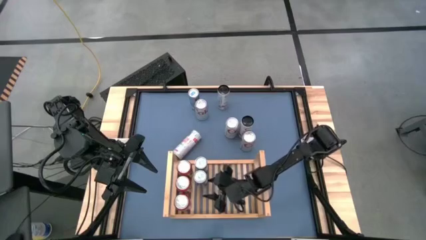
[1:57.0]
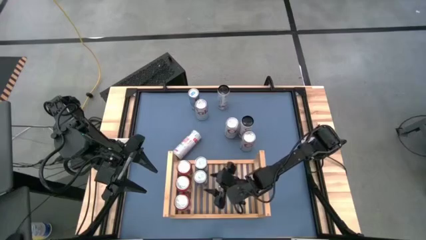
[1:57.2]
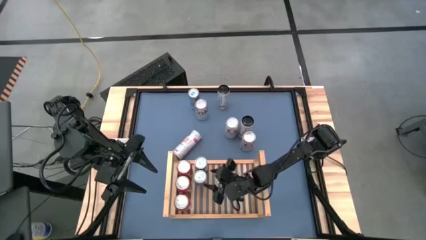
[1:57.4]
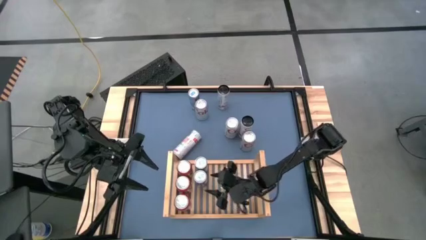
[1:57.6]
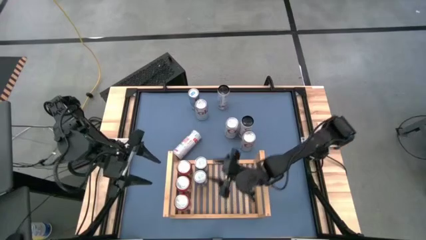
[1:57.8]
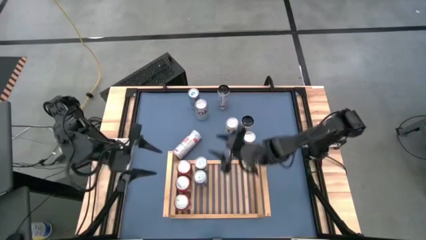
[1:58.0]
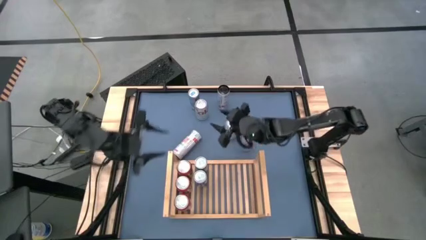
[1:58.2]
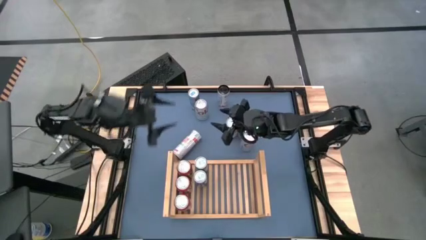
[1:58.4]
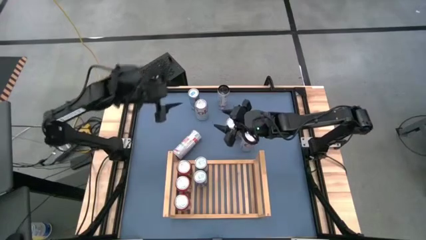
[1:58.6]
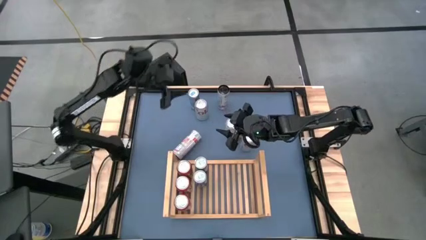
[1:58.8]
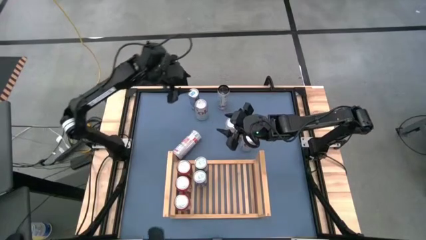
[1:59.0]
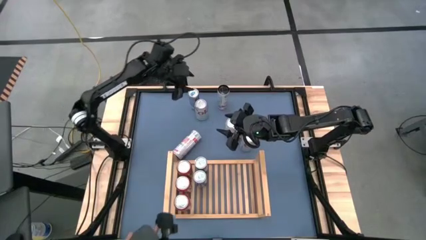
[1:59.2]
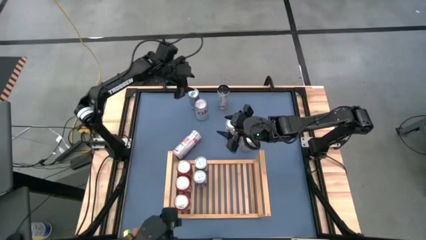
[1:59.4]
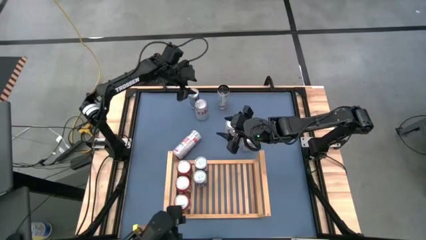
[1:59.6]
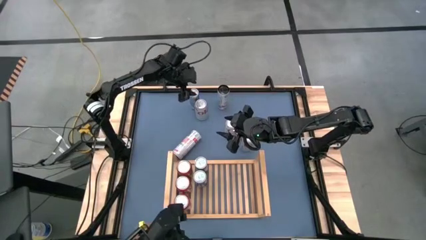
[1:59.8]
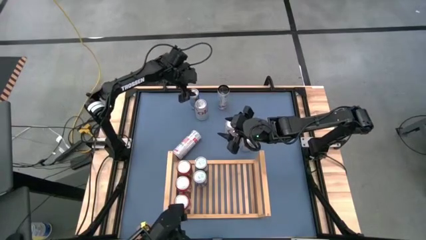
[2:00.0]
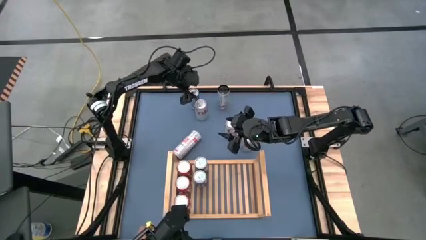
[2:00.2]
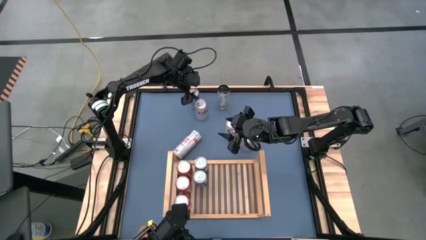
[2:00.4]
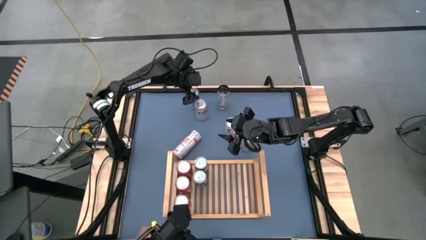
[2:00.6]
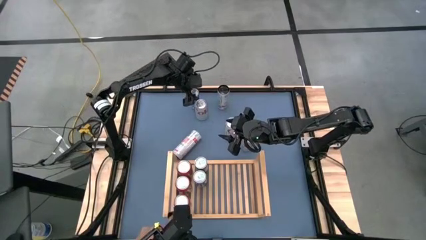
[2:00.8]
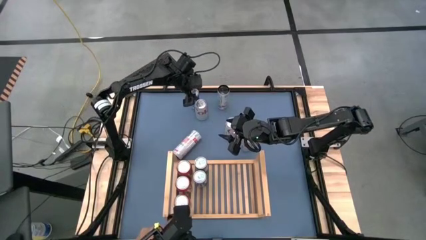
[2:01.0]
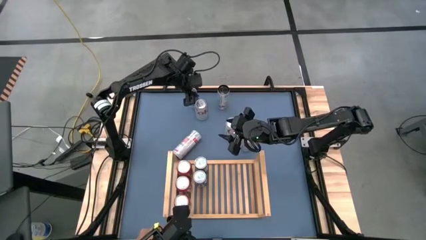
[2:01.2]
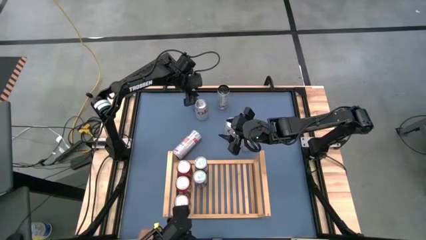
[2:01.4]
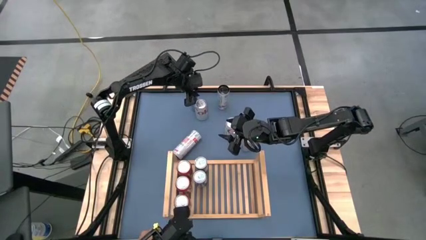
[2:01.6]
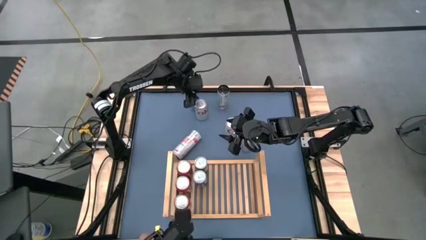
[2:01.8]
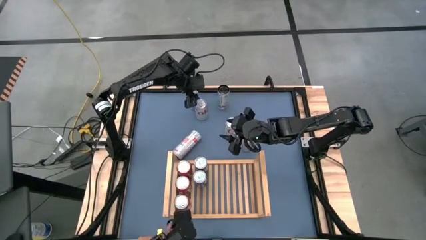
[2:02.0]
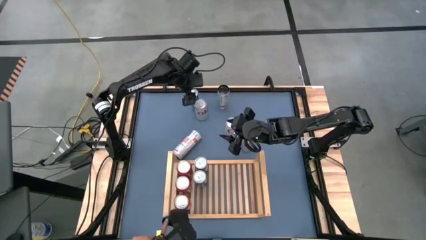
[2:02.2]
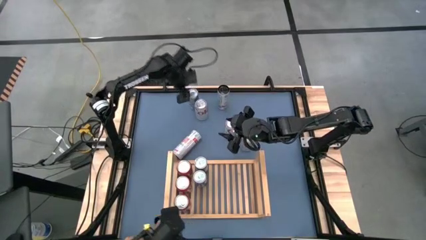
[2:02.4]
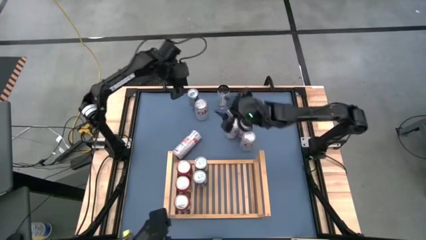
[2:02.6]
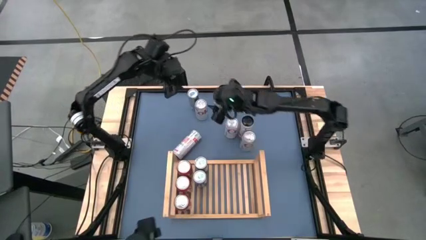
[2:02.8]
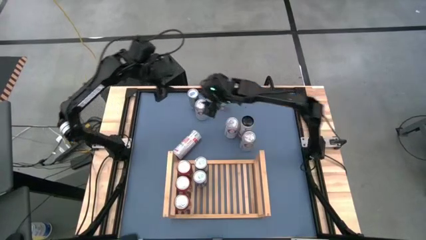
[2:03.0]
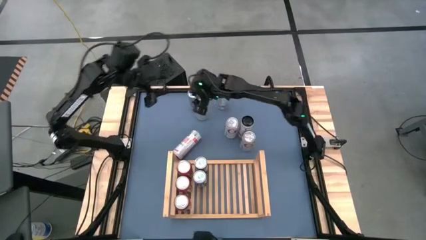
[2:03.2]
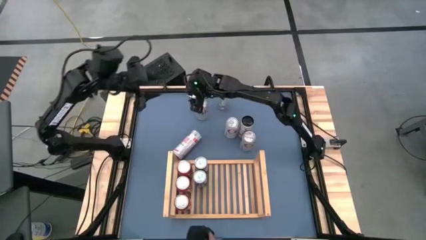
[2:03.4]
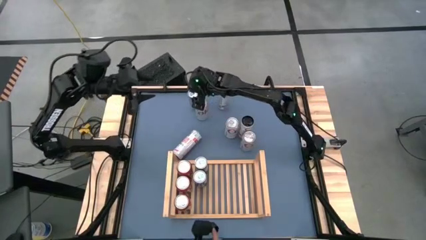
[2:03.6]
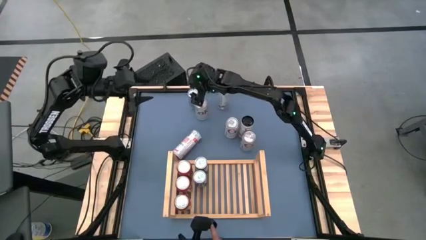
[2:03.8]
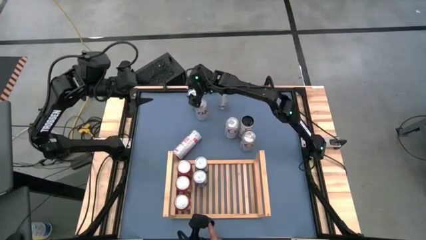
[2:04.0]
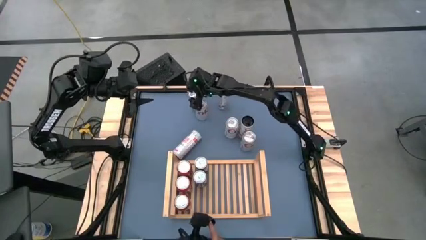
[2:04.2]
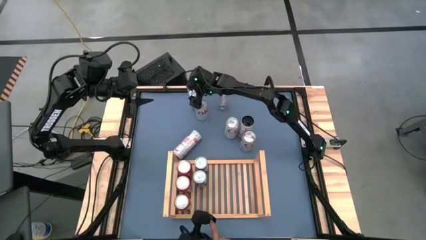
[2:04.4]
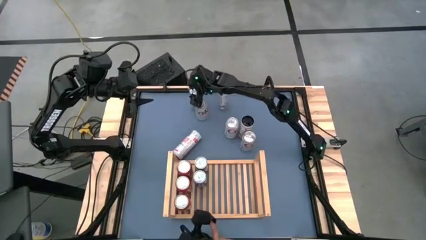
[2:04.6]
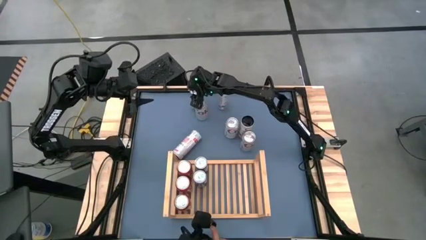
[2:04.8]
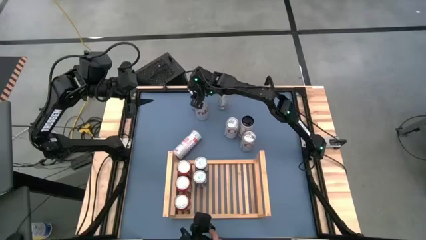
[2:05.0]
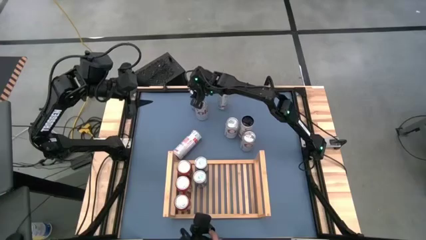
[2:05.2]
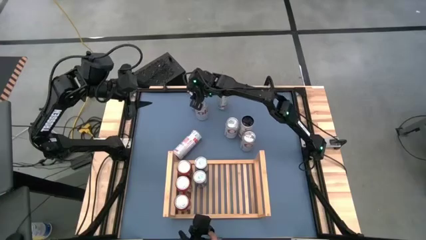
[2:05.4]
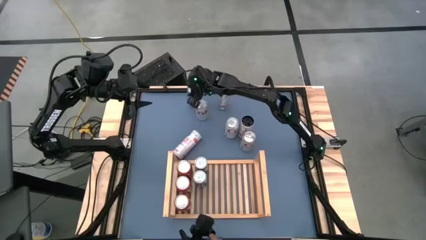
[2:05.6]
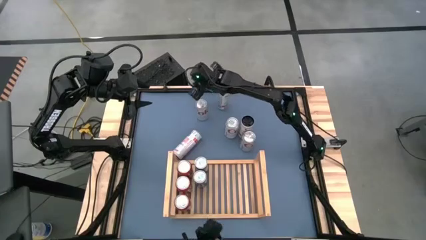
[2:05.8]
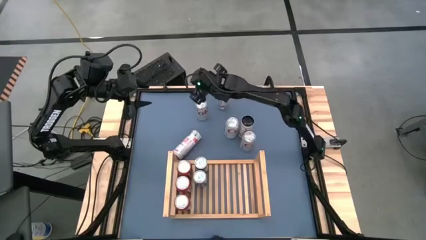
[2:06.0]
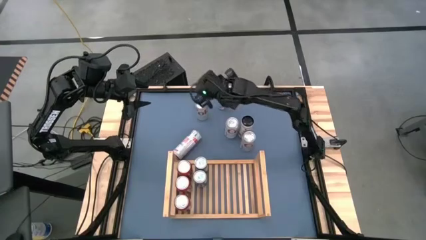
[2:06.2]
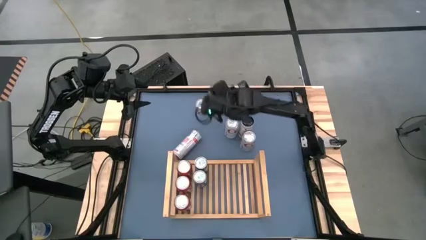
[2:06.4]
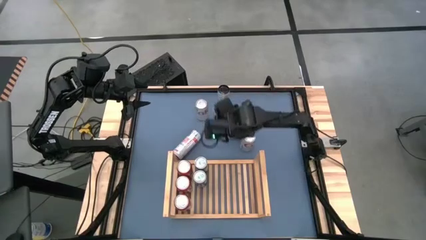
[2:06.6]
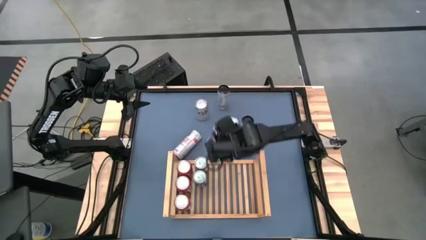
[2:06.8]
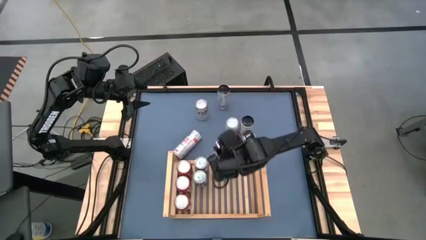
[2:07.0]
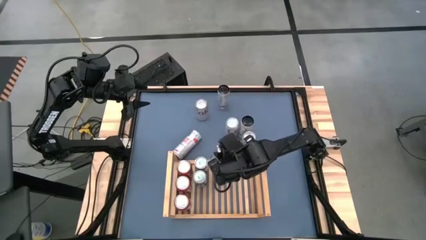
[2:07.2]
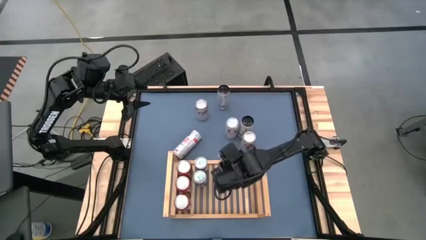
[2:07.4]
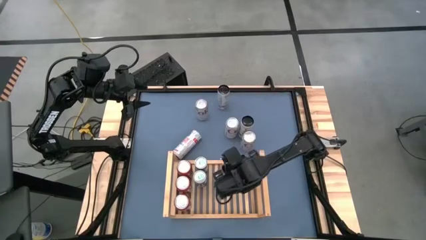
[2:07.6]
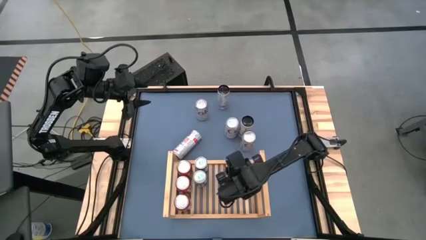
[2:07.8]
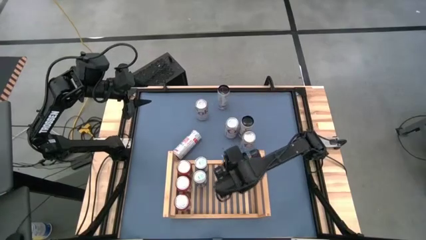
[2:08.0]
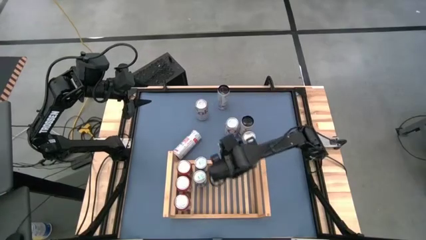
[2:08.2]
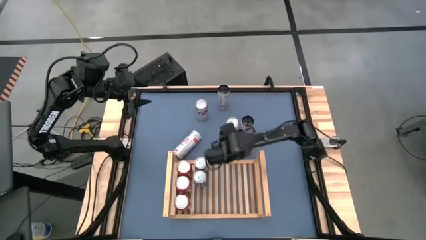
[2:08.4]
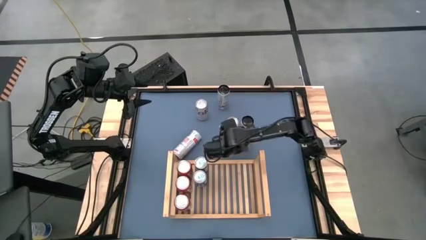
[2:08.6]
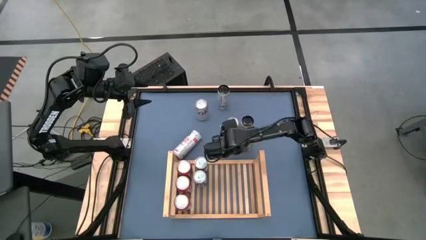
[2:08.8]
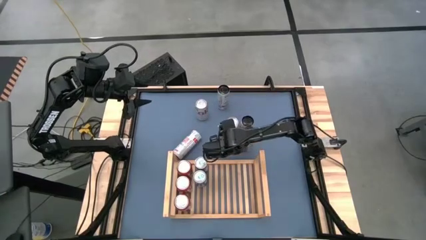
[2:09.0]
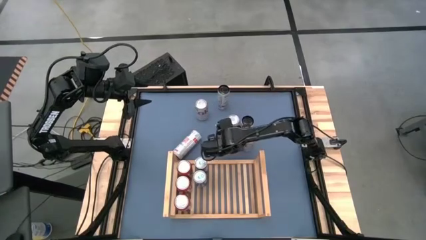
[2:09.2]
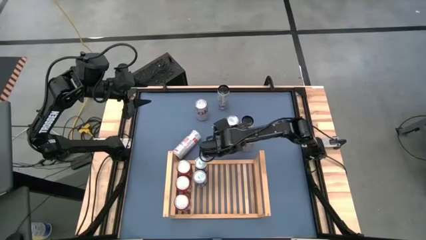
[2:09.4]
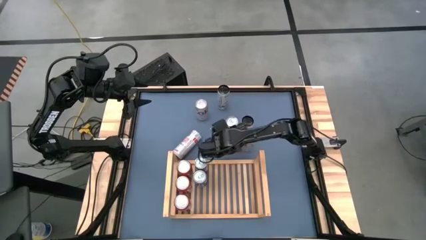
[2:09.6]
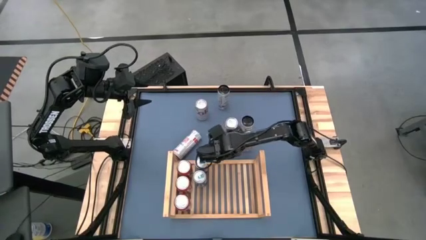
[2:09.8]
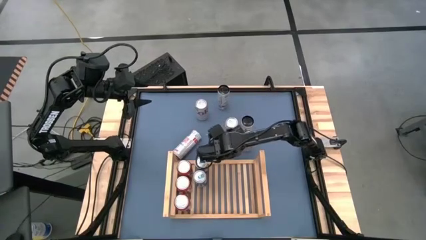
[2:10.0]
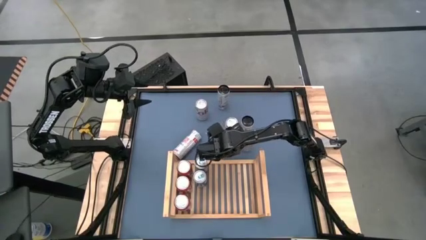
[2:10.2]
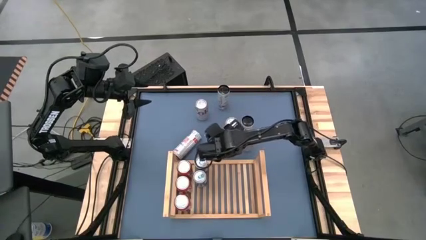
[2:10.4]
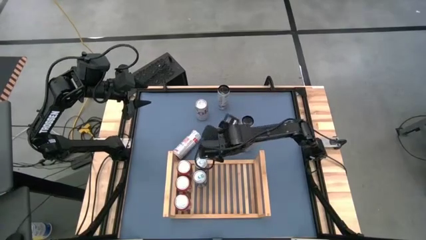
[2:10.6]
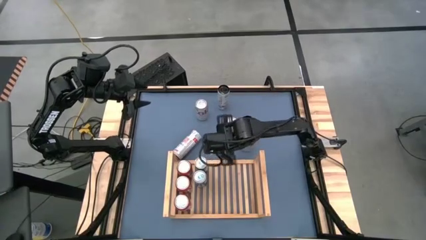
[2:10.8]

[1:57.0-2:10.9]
Task: Place canned beverage on shelf
Put the blue soda can on the shelf aligned with the other blue soda can
